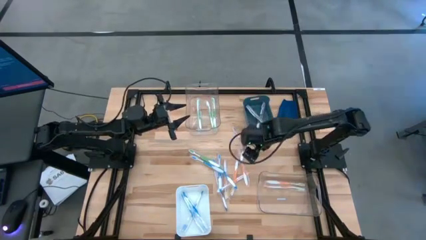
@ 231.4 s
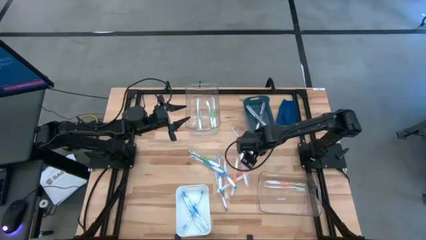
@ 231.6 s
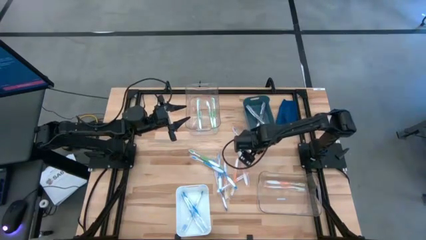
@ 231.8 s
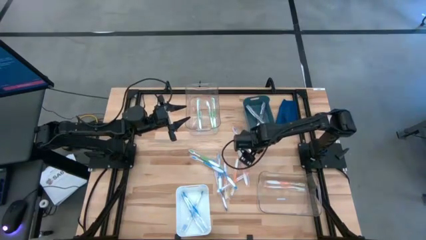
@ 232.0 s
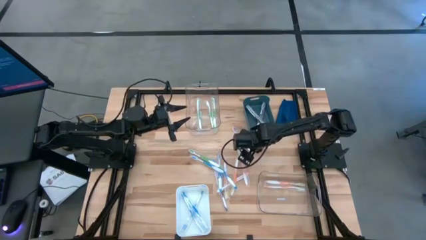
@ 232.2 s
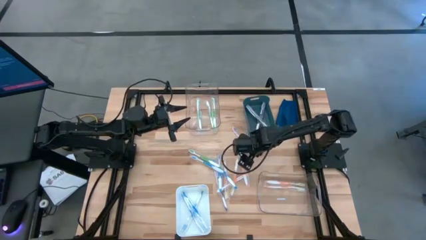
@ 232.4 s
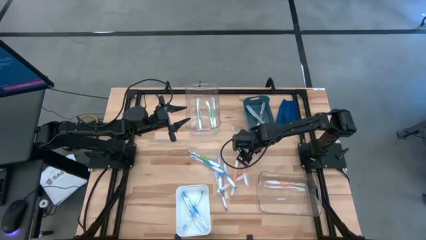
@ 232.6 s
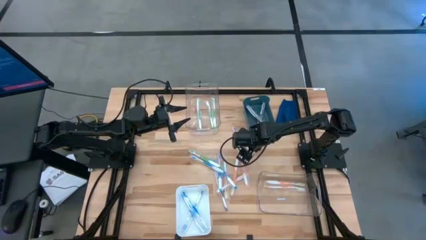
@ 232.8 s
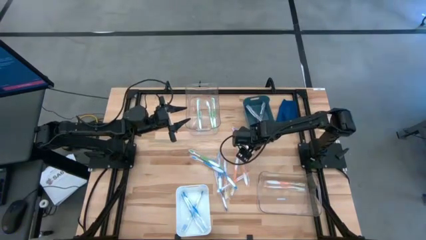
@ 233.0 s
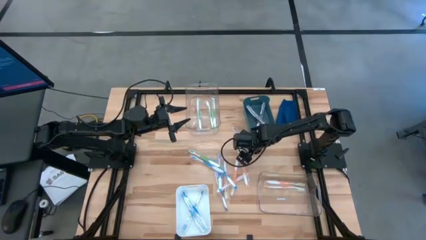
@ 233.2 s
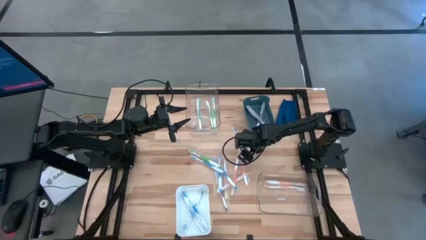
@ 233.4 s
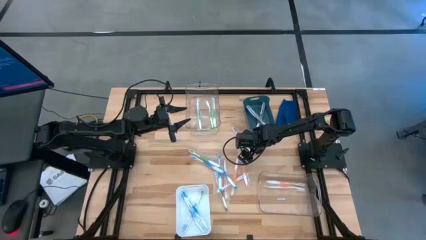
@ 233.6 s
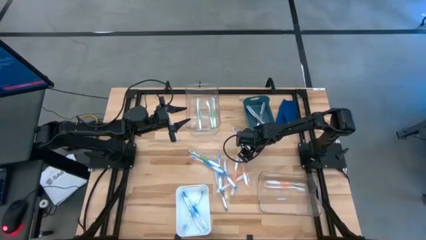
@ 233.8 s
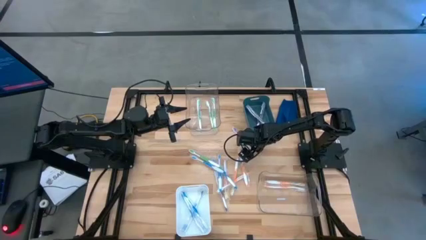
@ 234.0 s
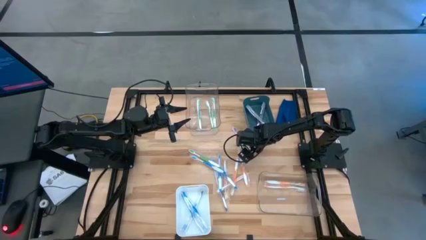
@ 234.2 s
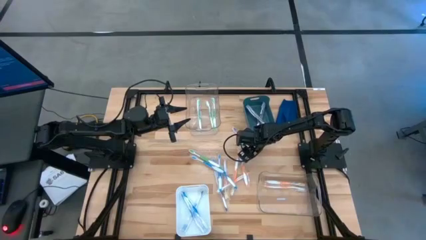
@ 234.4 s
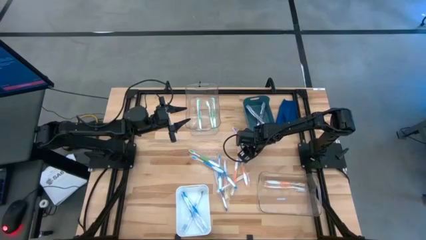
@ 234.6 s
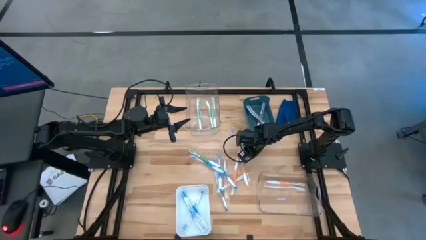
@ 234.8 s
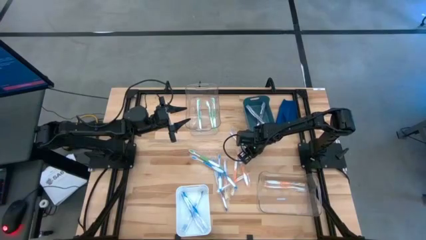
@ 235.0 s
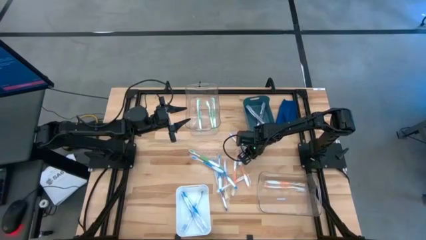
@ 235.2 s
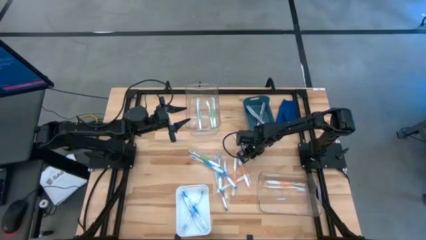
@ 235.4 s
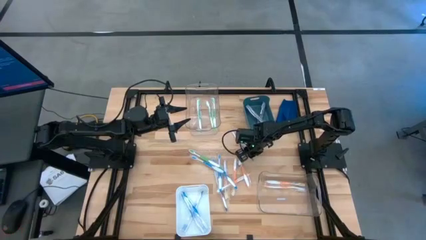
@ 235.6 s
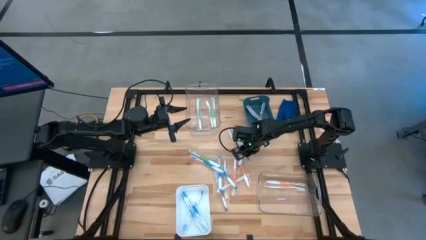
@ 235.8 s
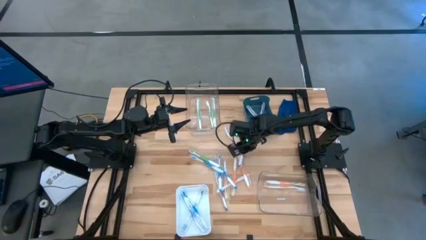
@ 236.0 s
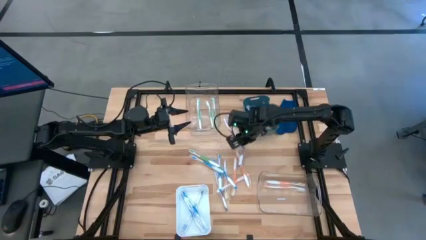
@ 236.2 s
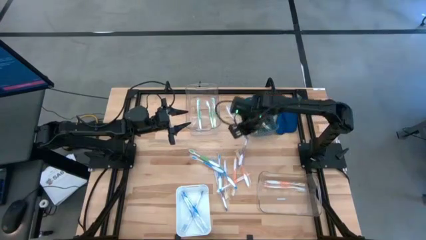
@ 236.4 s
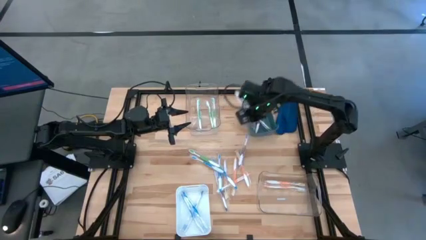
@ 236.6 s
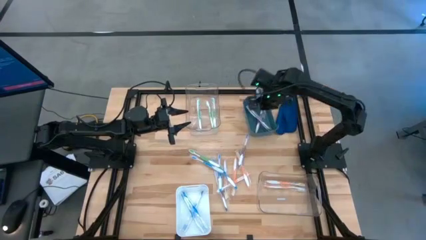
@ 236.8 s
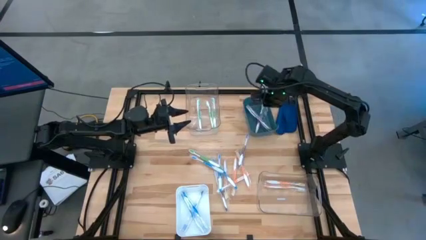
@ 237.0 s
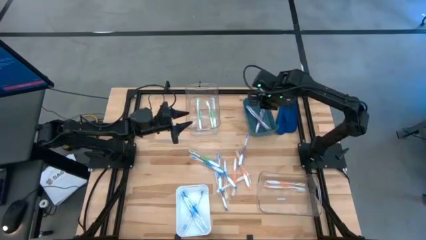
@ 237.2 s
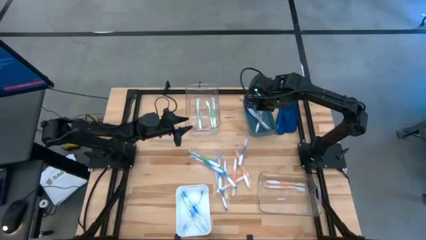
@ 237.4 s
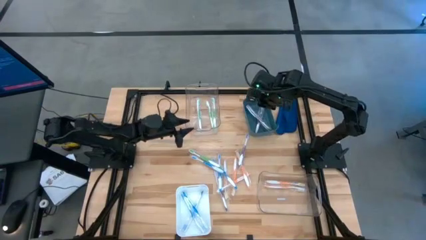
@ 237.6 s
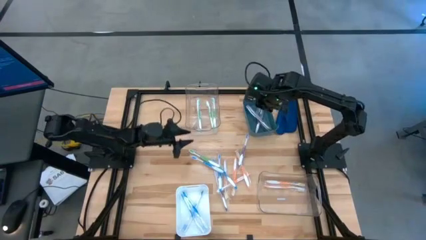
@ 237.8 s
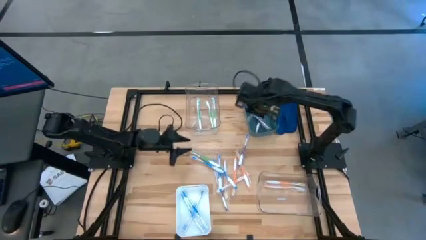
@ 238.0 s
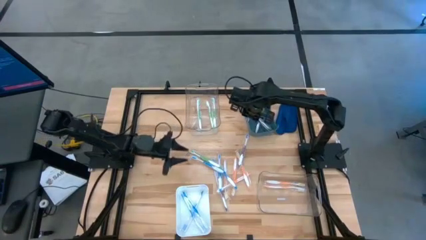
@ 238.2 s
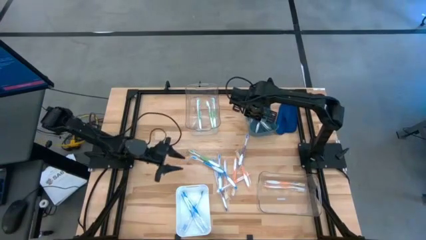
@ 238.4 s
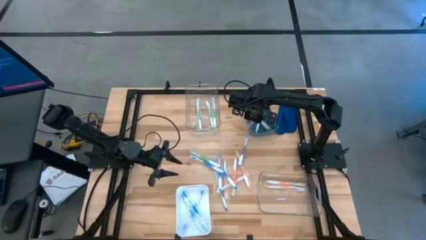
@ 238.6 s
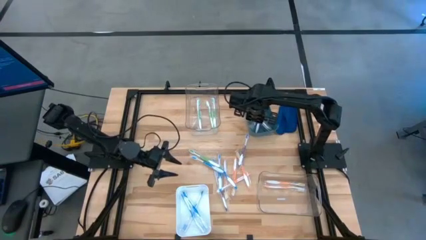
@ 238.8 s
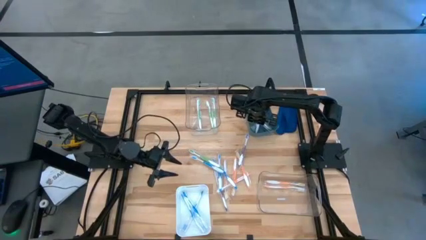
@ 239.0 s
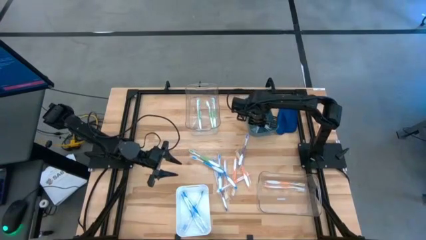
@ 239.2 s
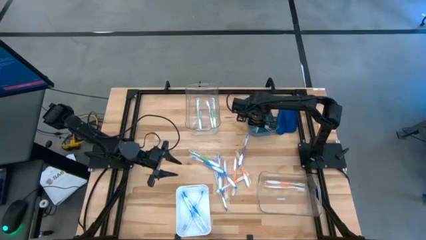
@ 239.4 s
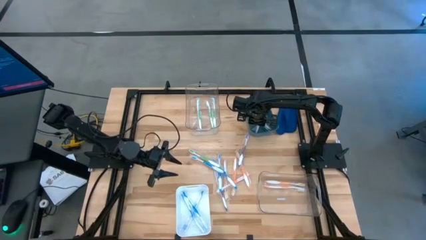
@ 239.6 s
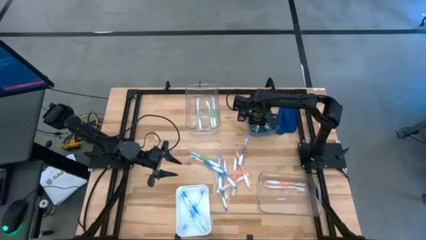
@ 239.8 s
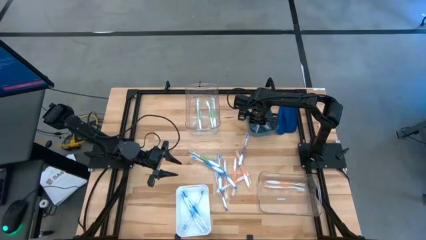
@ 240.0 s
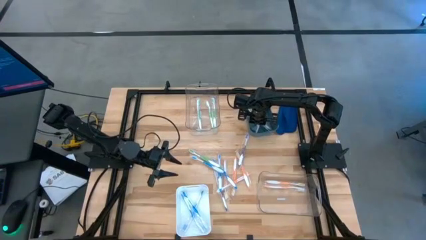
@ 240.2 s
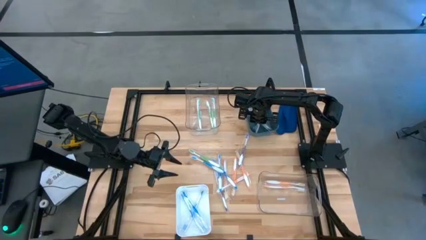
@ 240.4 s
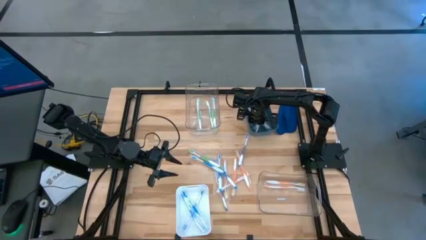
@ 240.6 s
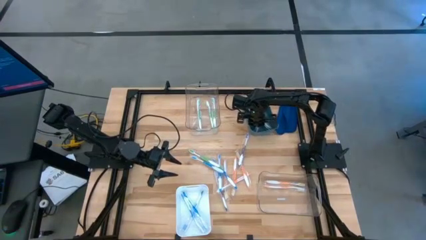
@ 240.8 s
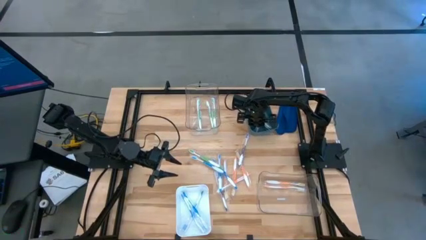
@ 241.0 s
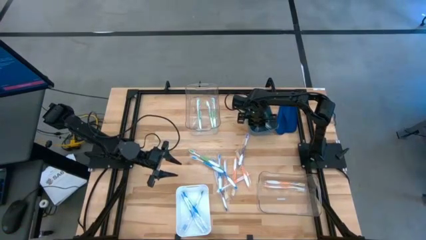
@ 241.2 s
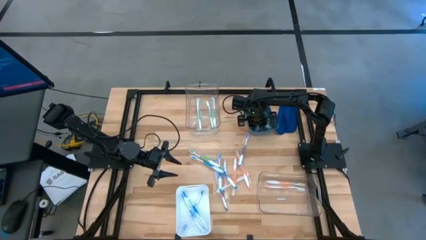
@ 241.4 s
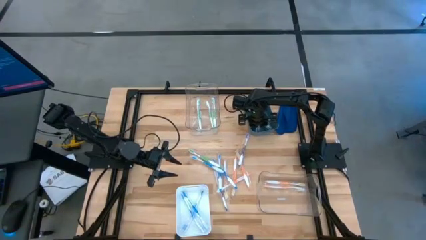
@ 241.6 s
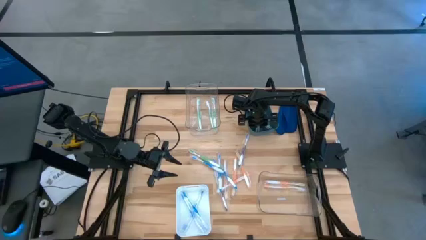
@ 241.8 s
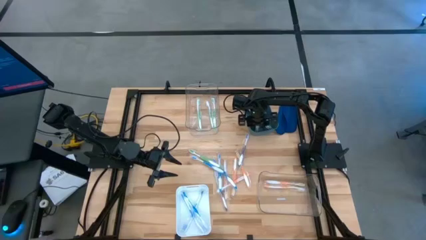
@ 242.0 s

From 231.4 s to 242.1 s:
Task: Pick & Place Toothbrushes
Put the purple toothbrush into the green bin

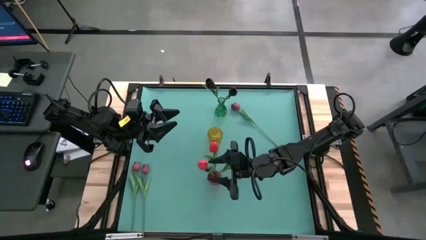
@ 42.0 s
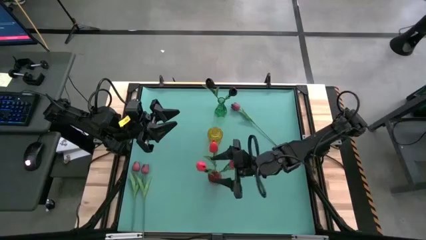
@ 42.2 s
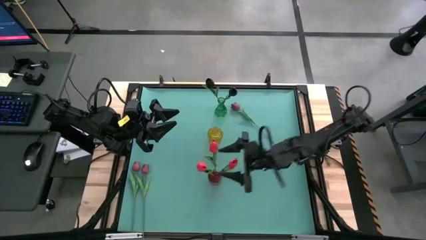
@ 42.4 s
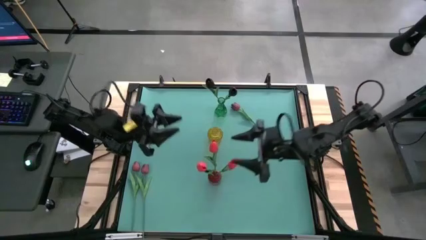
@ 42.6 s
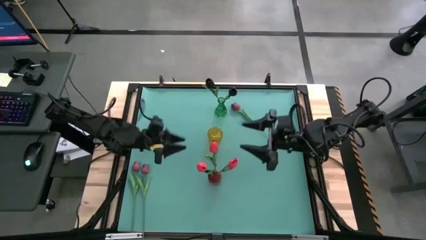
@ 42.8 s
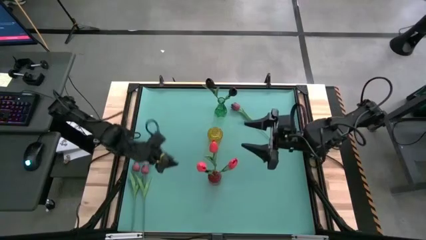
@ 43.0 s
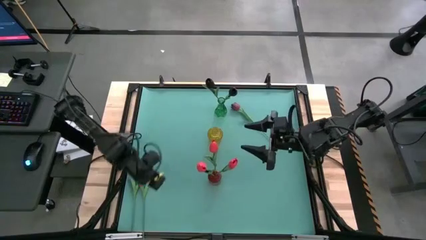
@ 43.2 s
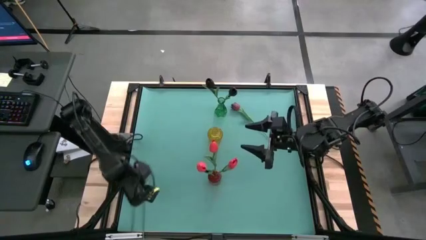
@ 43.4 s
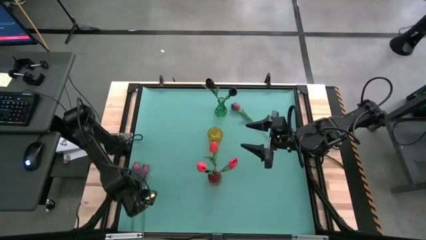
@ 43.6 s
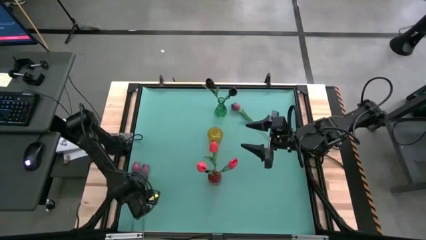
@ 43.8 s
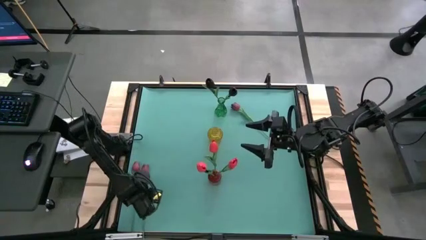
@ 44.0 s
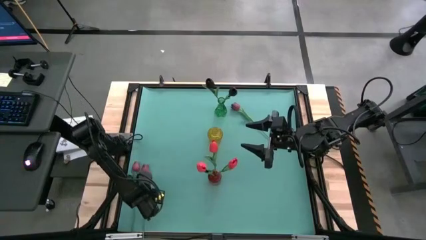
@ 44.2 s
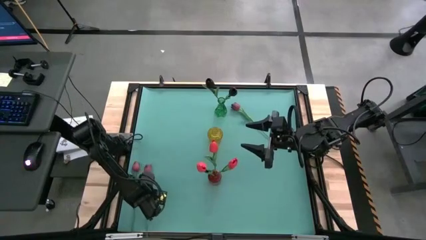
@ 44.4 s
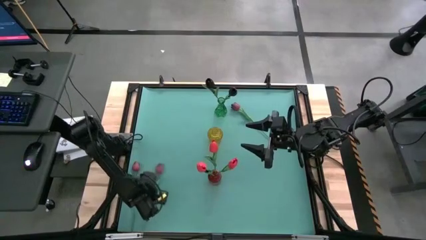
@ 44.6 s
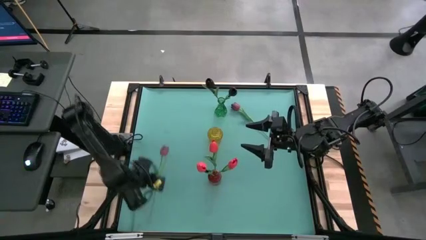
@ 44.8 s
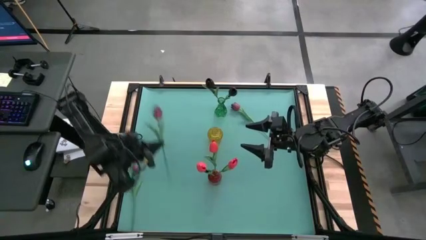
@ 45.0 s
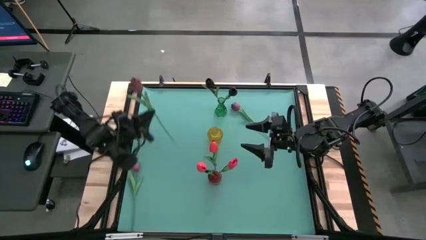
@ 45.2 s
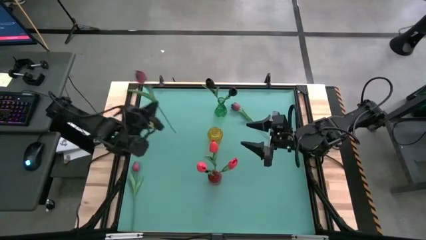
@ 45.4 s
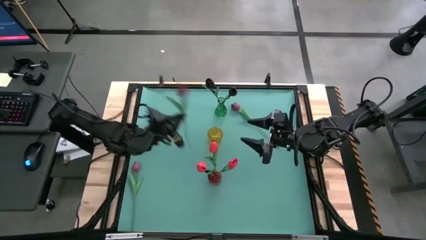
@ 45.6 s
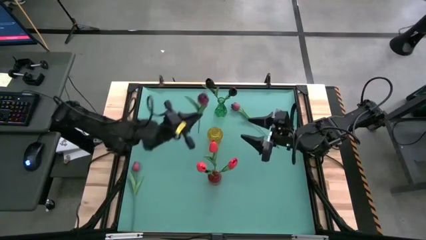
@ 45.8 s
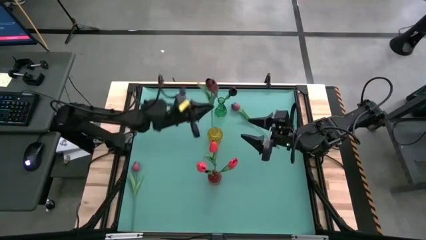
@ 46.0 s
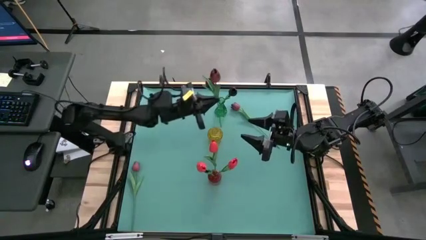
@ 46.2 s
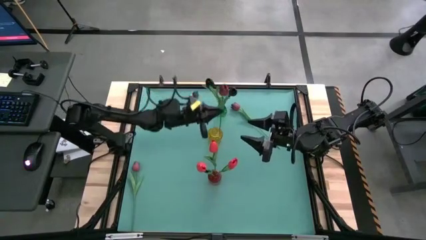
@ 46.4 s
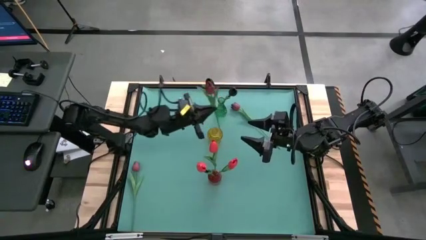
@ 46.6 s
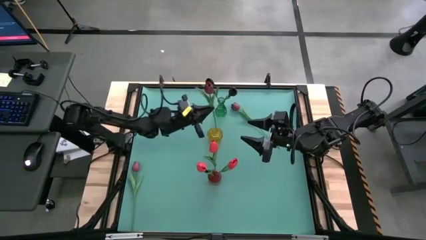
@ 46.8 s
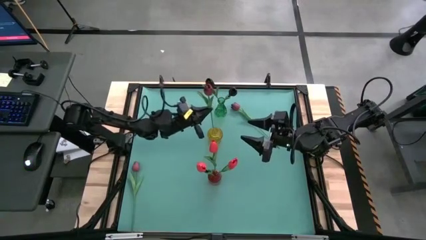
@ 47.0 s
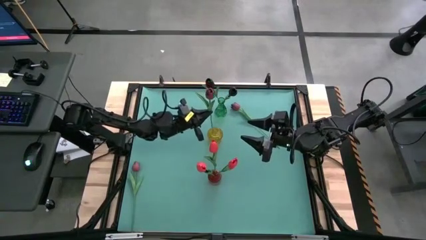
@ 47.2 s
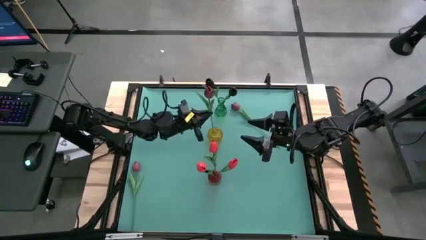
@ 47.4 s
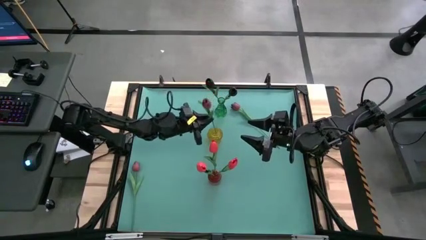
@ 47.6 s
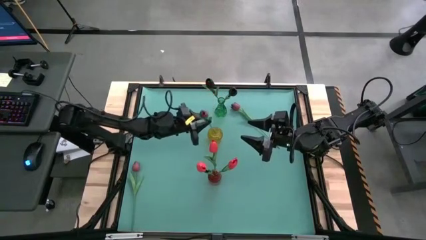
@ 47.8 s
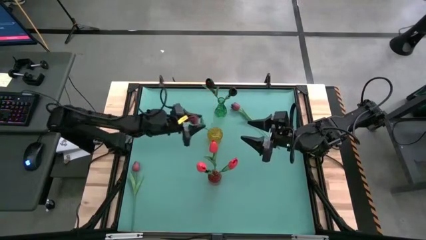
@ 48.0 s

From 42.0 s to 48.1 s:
Task: Sort flowers into vase by color
Put the bottom right red flower into the yellow flower vase
